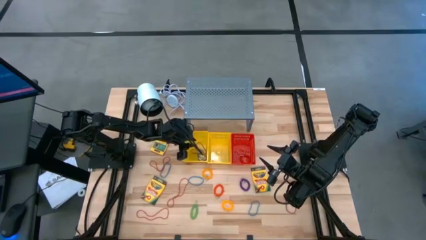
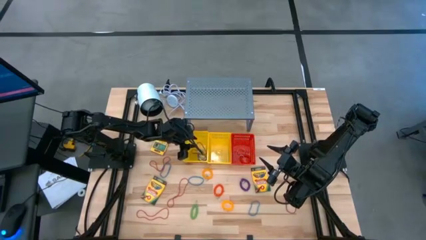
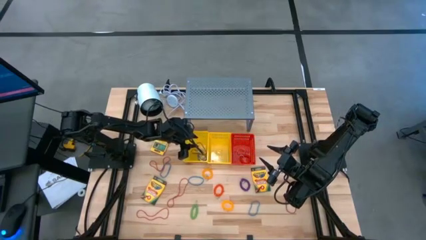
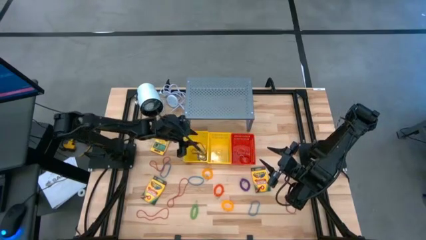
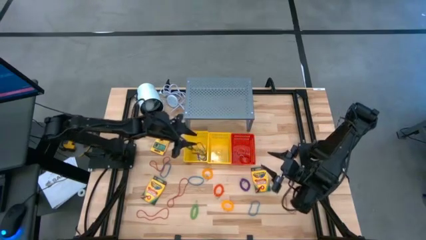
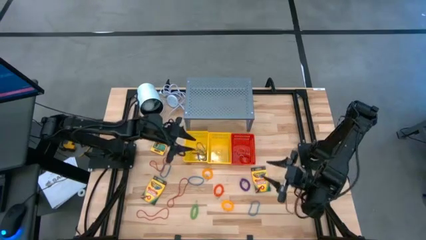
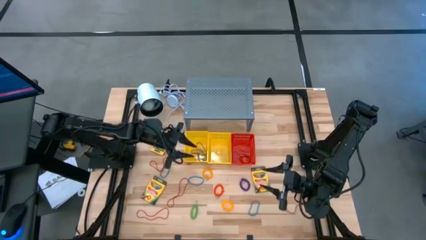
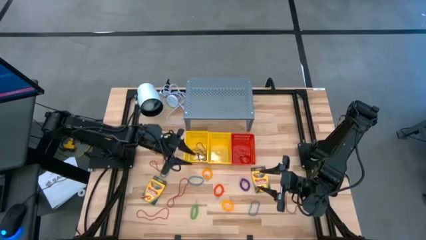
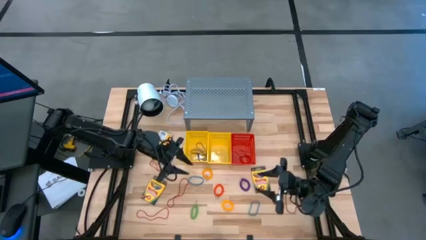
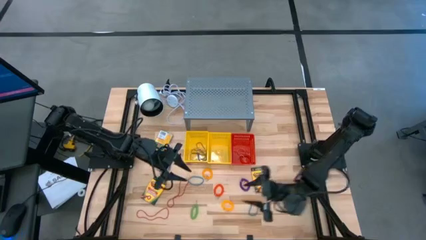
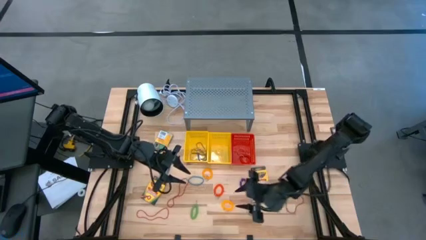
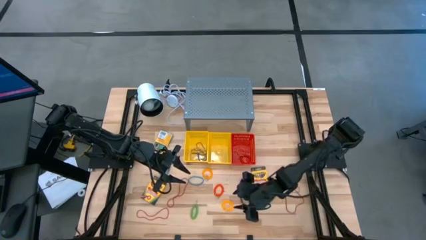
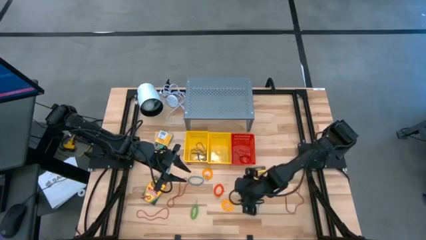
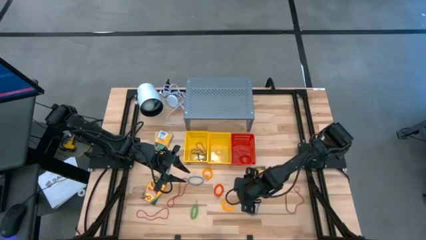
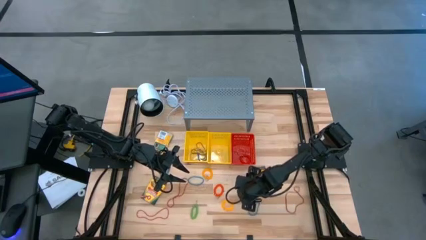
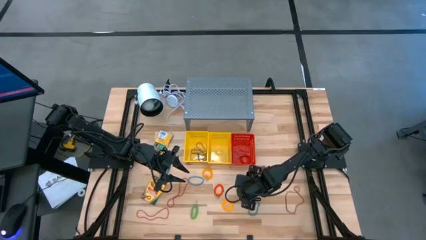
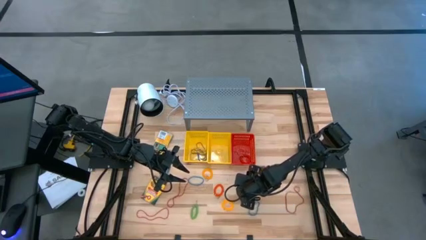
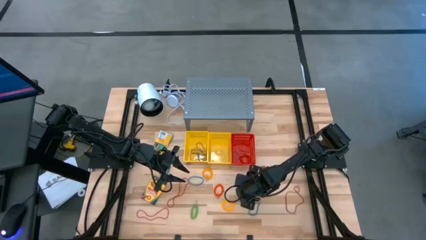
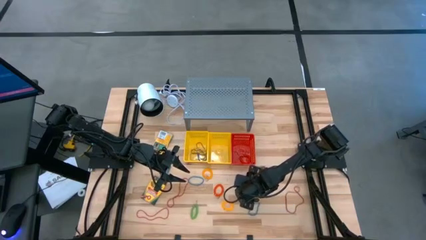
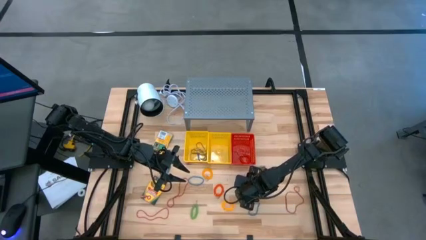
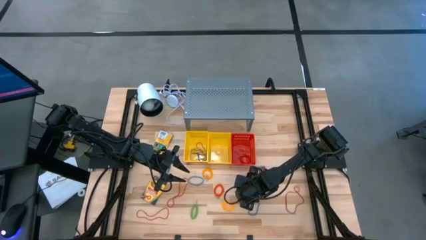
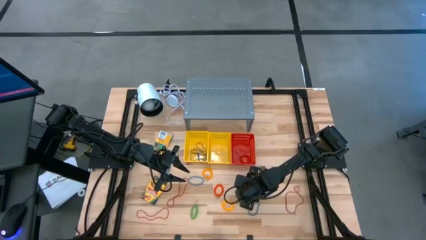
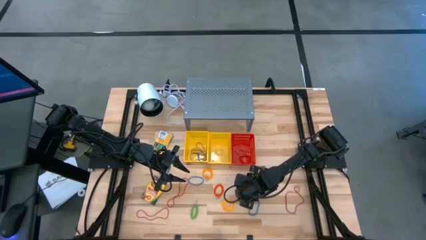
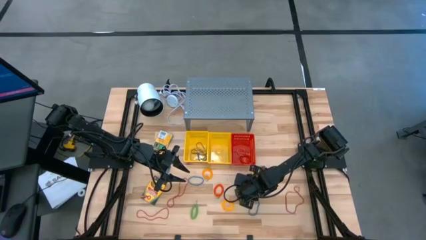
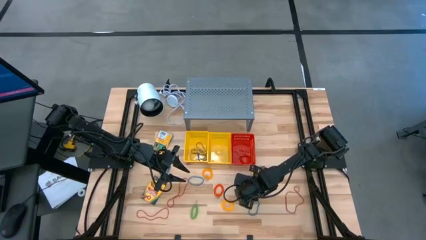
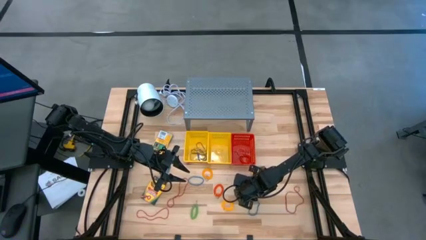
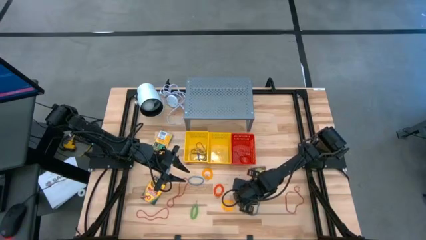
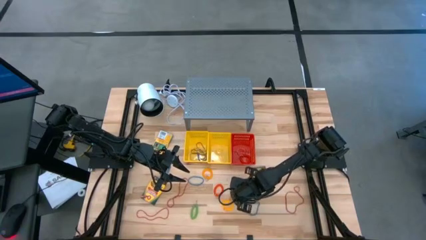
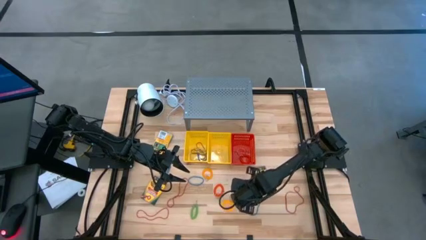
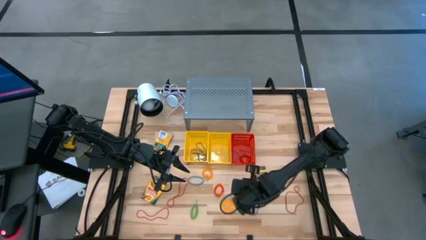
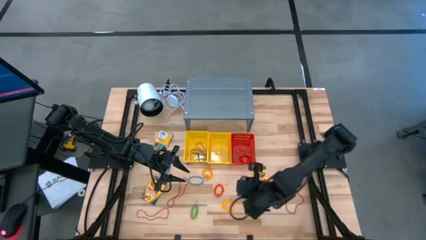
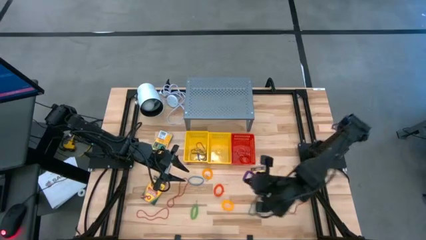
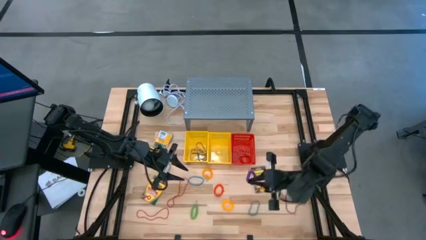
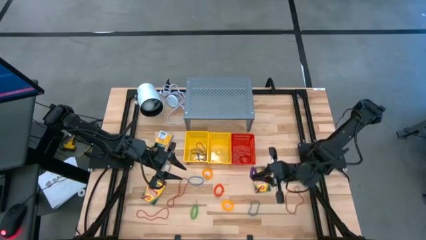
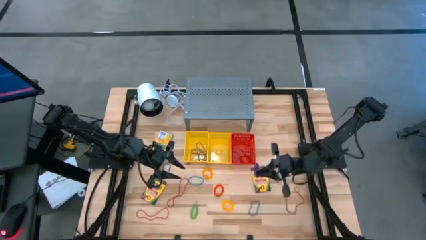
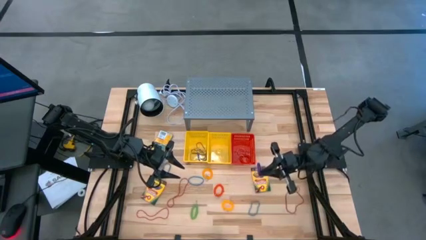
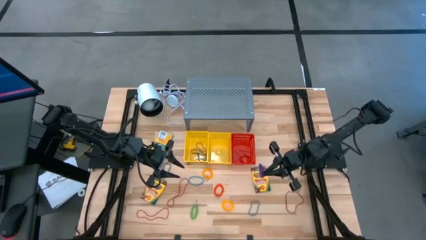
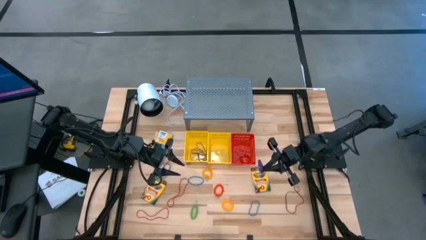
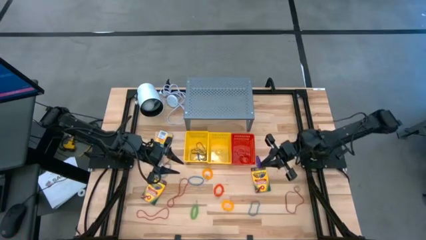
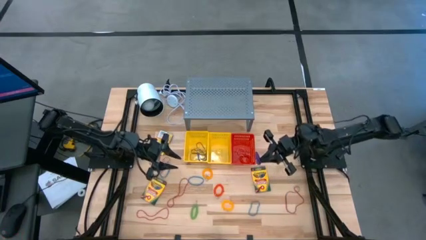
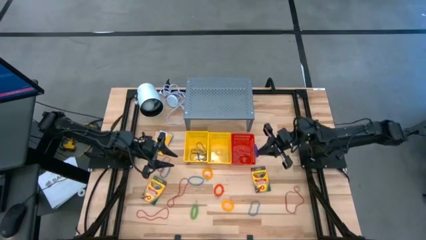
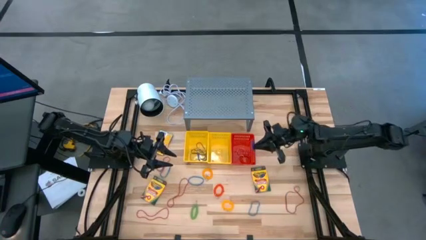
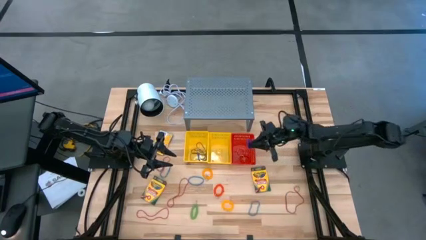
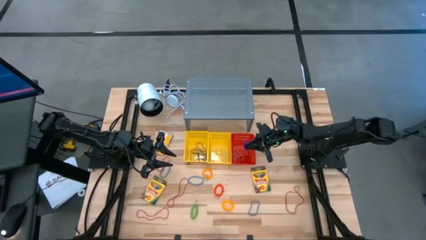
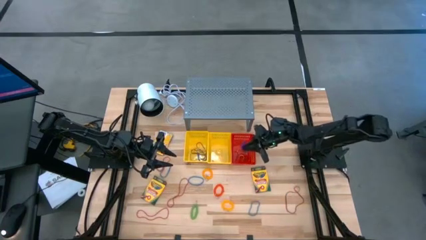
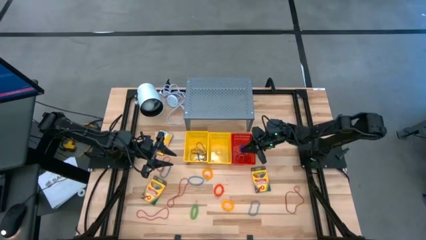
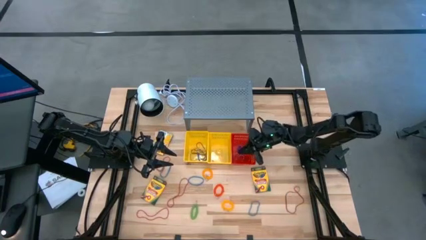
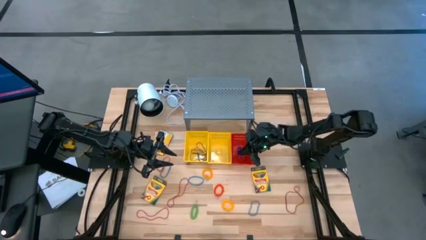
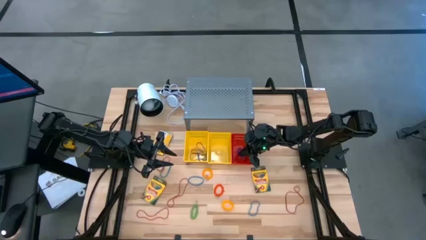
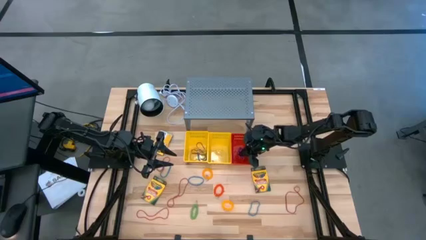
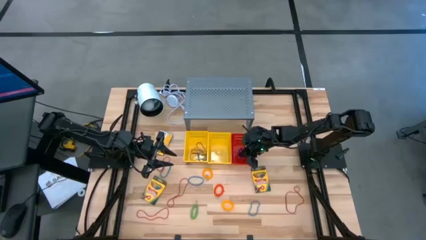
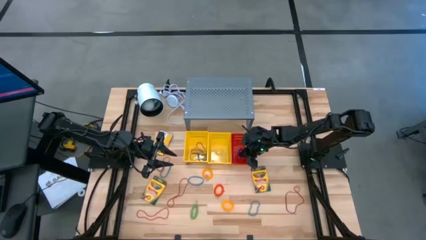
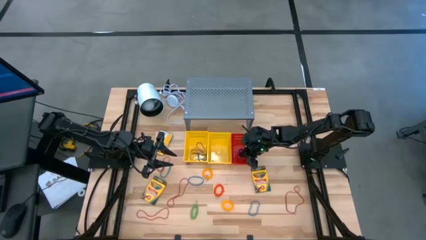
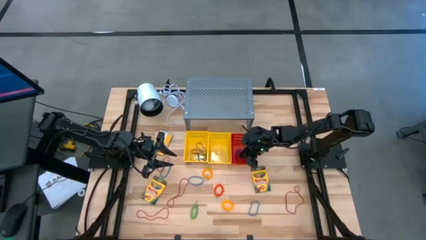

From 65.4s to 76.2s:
Task: Pick & Place Office Desk Supplies
Put the purple spring keychain into the red basket

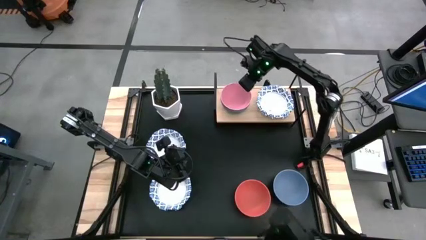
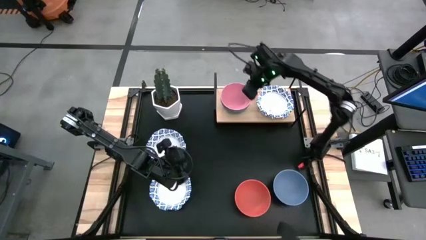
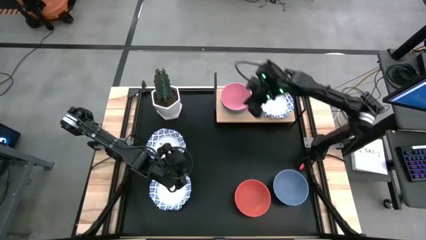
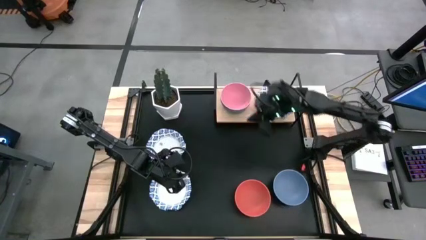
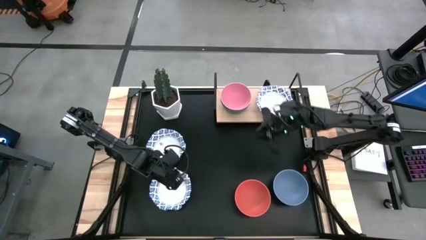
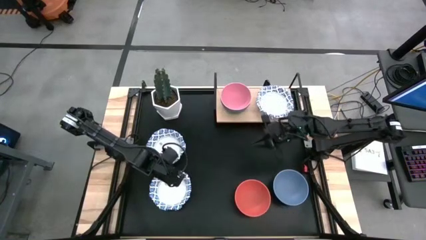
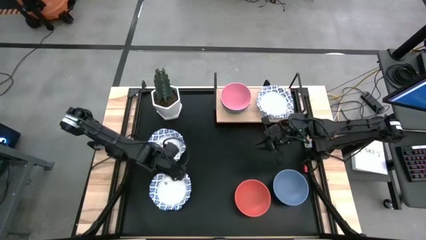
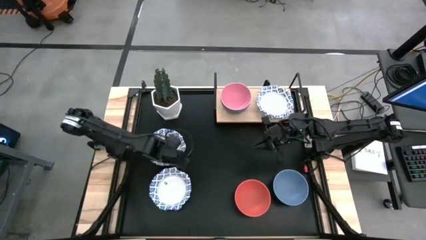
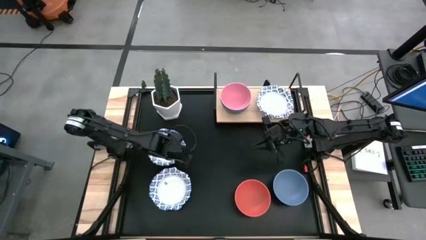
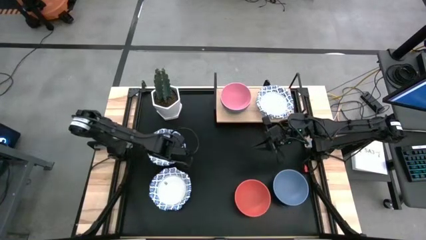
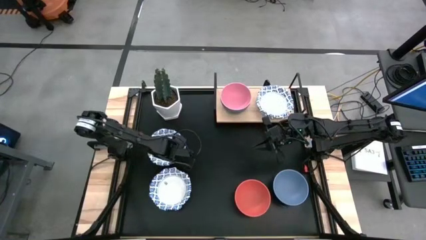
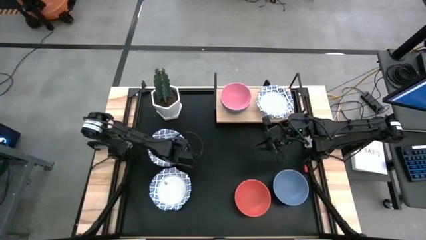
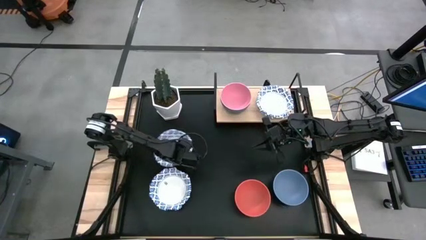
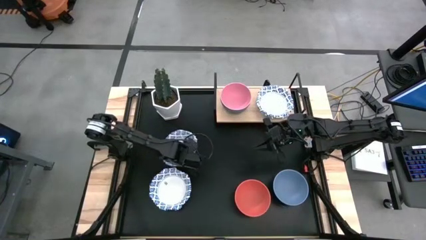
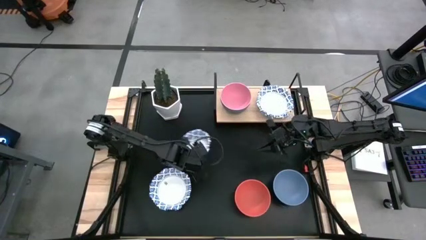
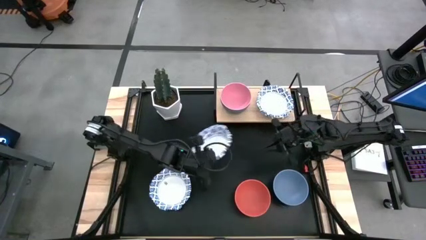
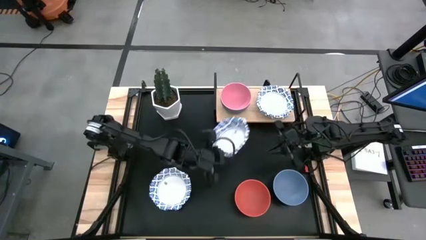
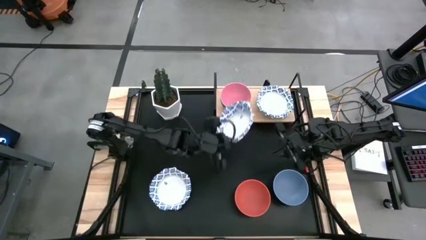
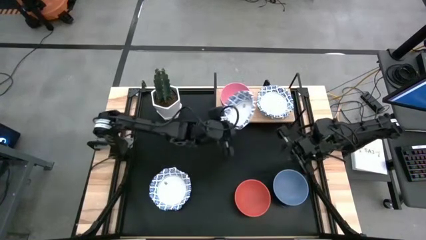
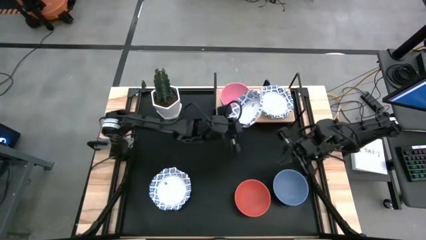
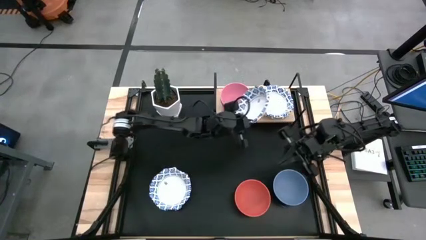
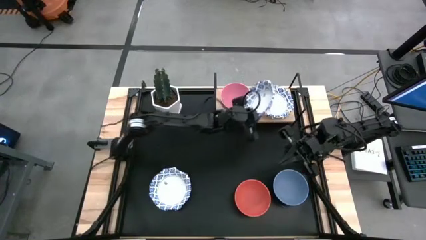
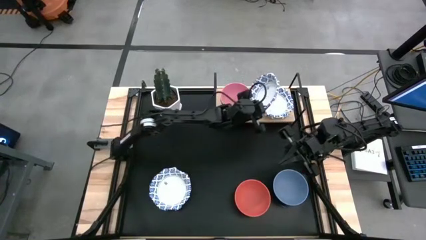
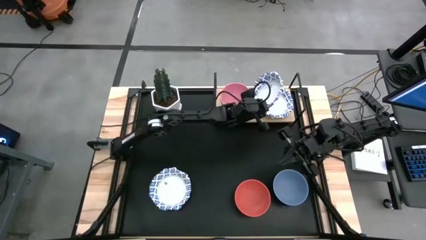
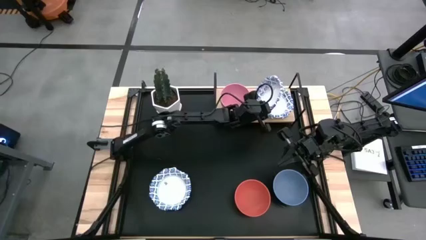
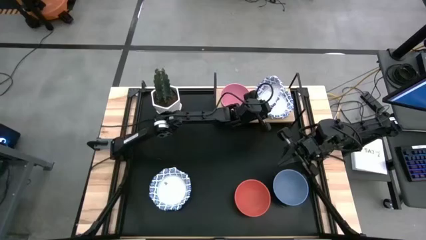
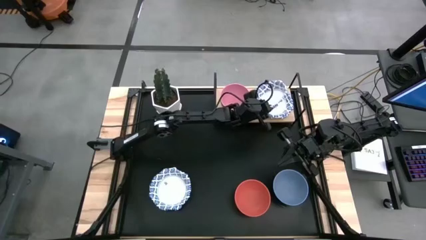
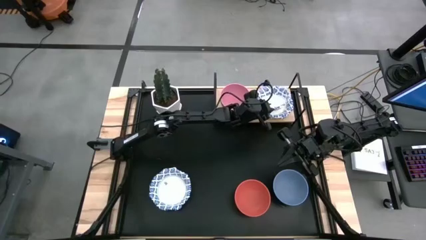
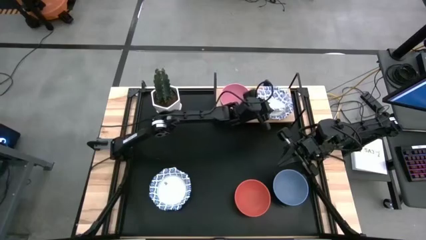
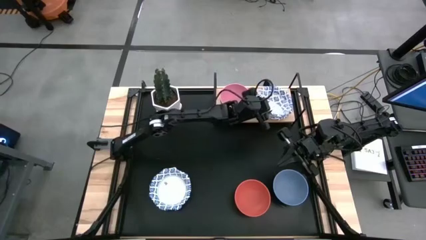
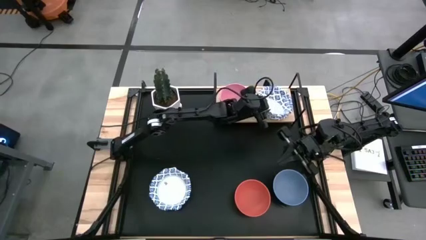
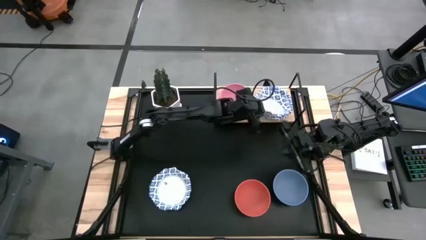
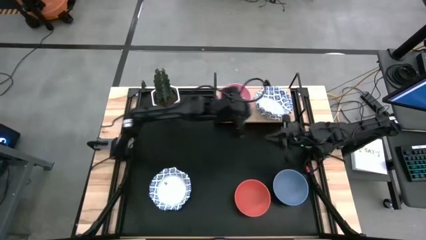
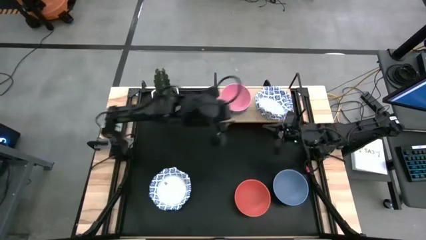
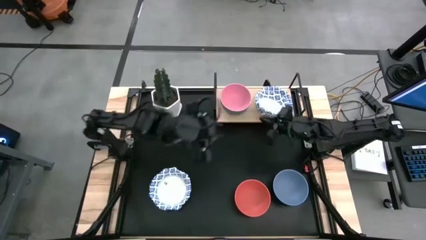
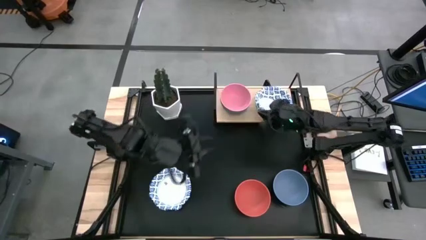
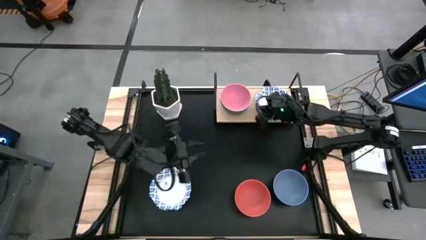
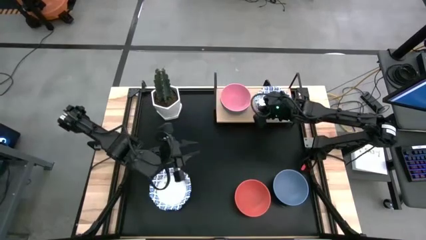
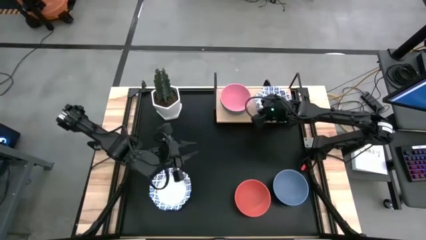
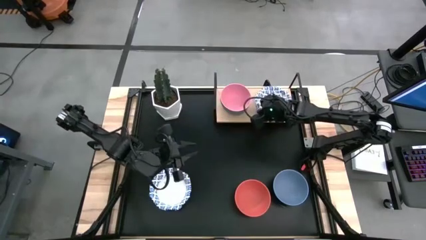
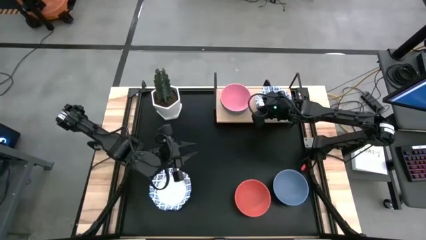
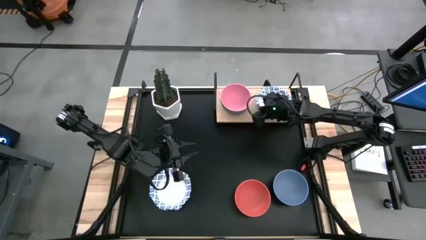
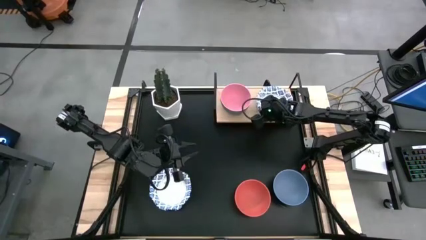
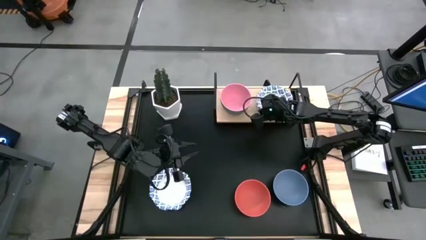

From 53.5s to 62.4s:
Task: Place and stack bowls onto a shelf
Stack the blue patterned bowl on top of the blue patterned bowl on the shelf
